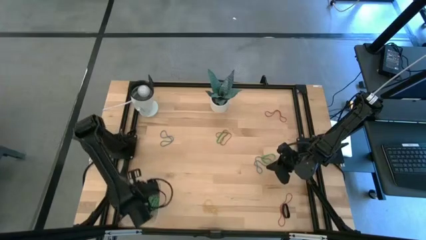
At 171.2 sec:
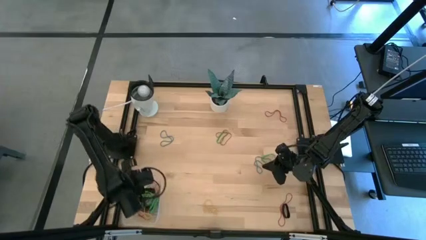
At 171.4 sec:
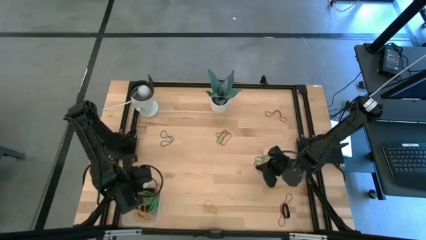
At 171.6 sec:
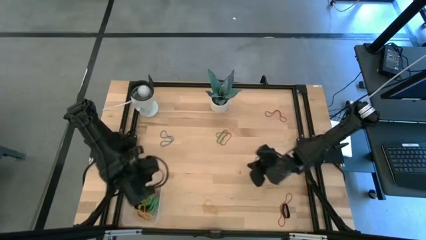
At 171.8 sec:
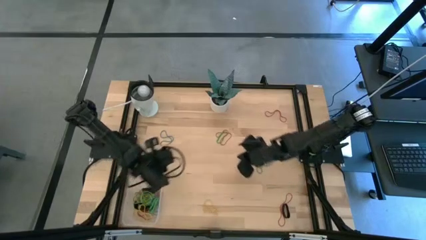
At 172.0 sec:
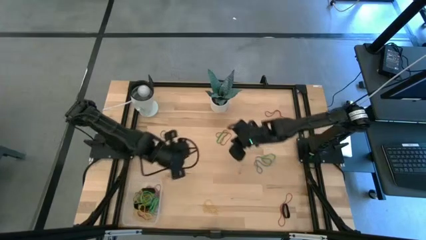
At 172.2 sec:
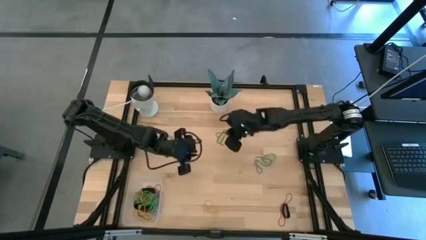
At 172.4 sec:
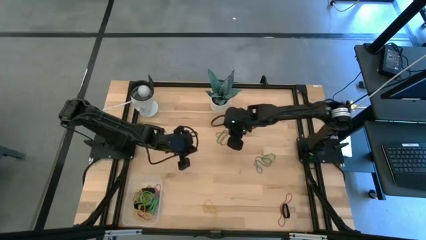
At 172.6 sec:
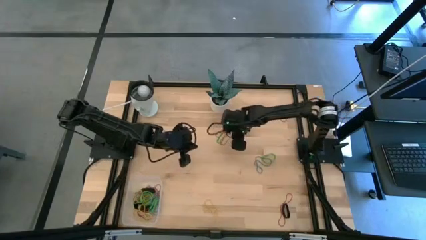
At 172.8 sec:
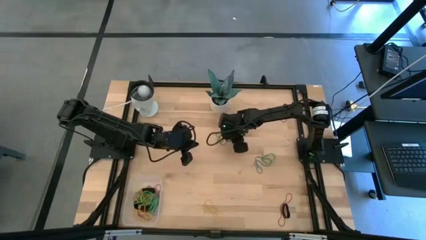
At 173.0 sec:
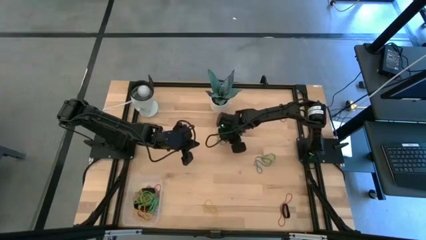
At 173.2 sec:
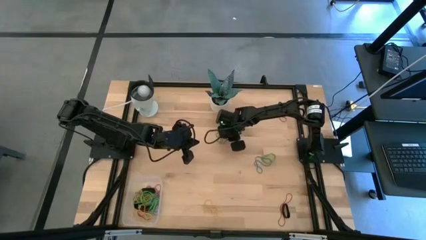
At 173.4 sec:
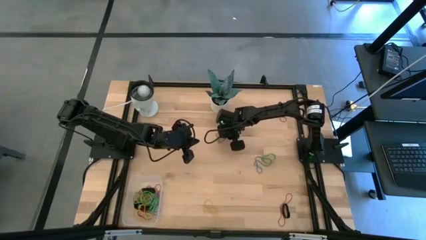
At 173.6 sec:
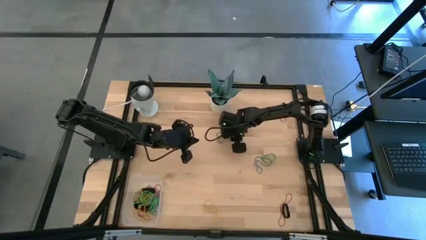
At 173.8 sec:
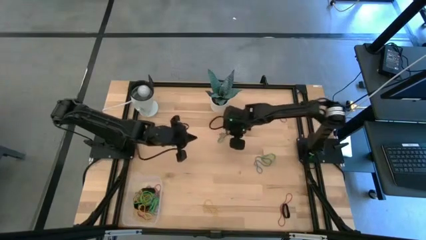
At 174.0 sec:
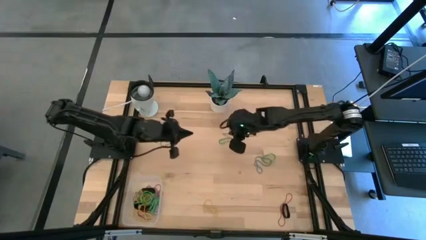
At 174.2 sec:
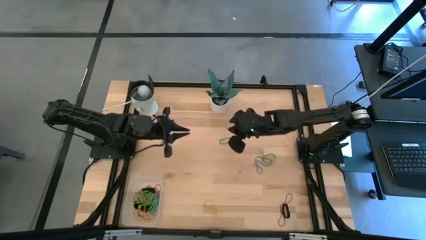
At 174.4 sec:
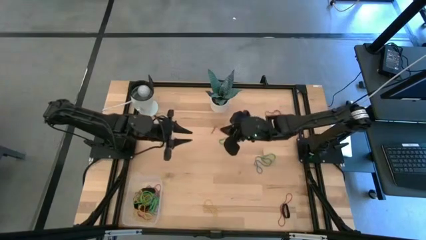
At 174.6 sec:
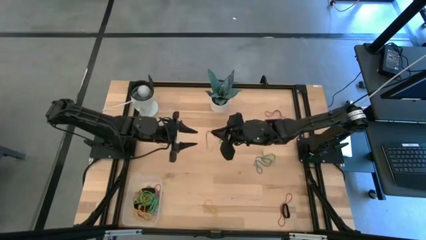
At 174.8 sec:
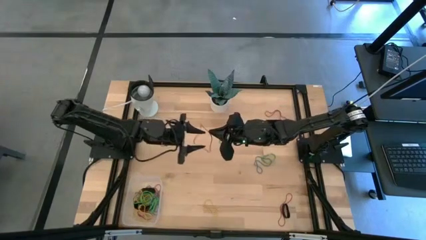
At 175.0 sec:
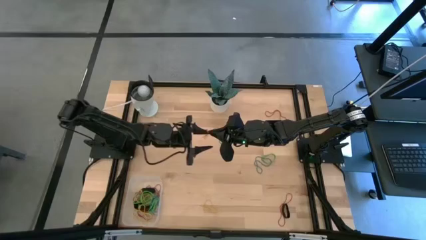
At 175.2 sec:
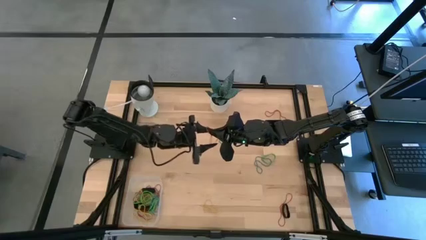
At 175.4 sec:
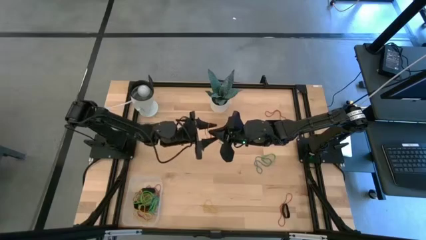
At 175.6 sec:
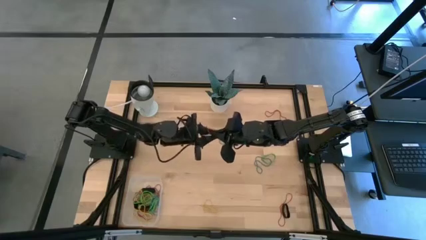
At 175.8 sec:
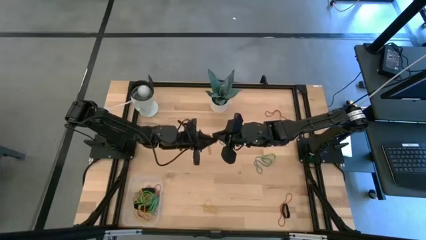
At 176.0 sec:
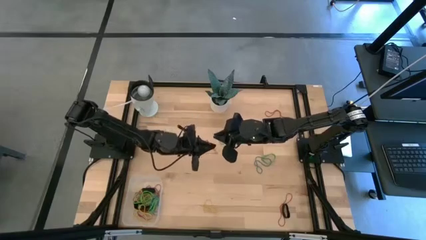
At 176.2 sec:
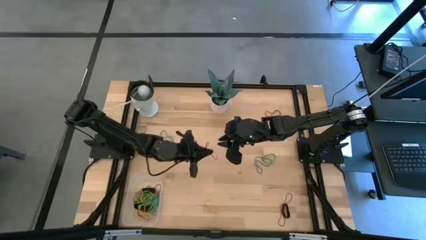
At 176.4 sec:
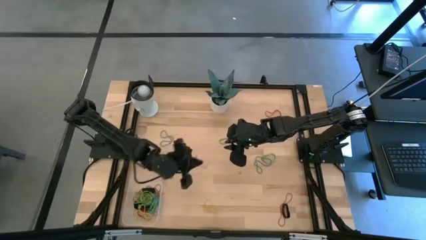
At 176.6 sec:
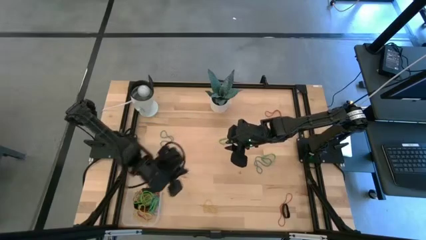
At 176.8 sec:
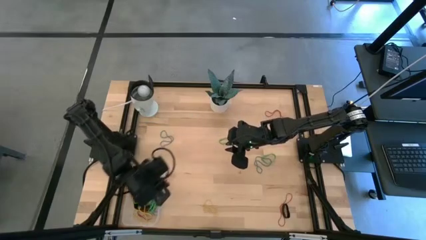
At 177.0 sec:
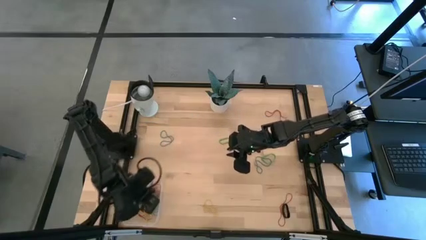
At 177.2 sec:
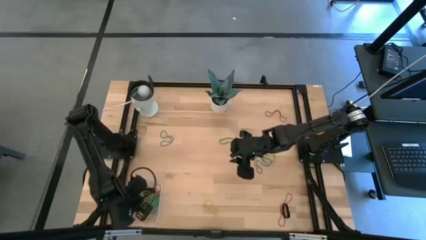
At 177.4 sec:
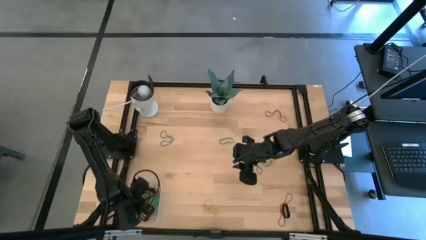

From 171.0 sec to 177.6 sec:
Task: Pick and place rubber bands into bin
Put the red rubber band into the transparent bin

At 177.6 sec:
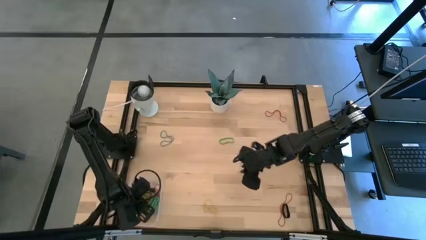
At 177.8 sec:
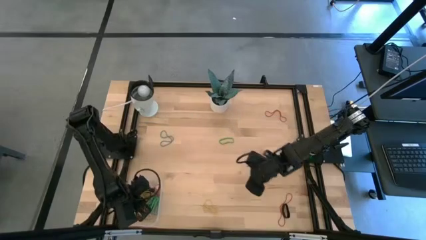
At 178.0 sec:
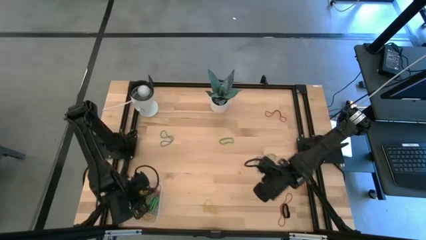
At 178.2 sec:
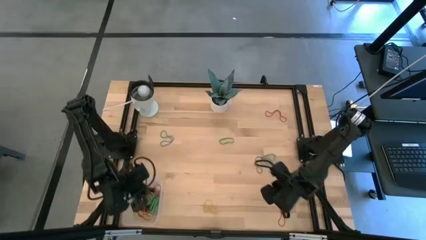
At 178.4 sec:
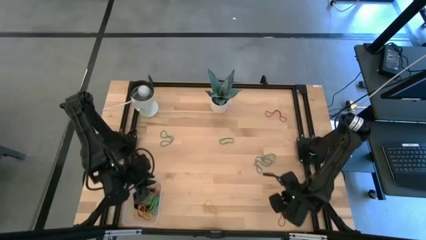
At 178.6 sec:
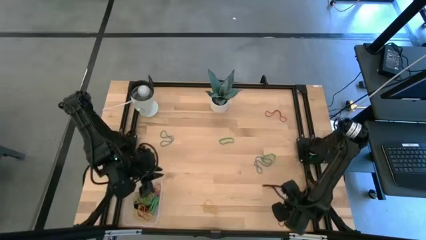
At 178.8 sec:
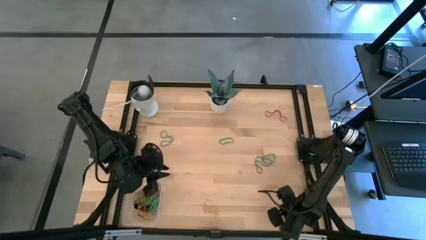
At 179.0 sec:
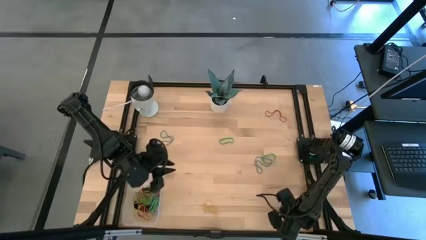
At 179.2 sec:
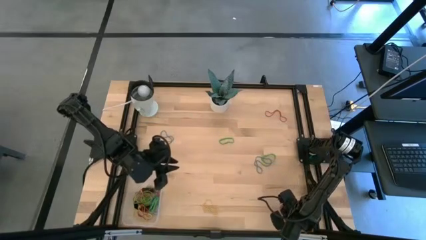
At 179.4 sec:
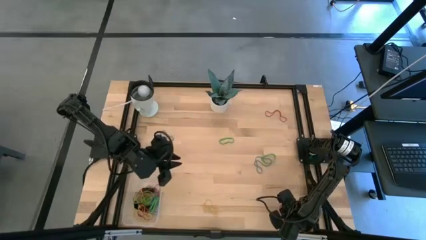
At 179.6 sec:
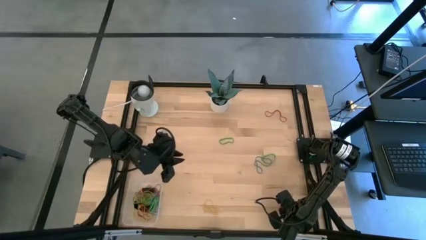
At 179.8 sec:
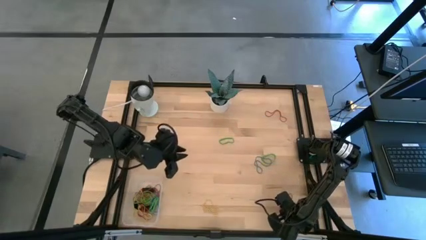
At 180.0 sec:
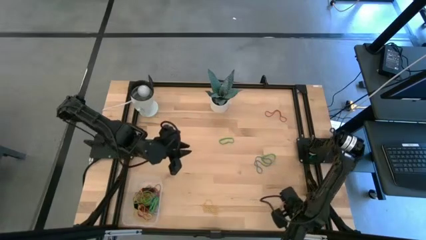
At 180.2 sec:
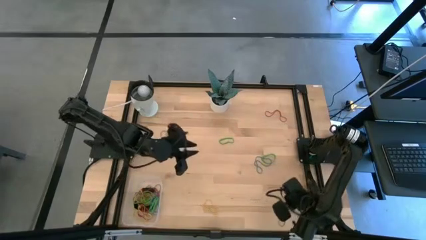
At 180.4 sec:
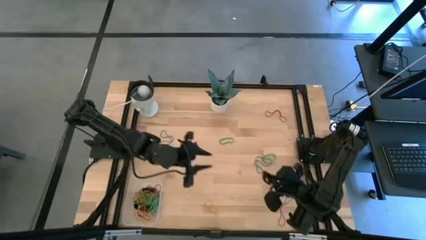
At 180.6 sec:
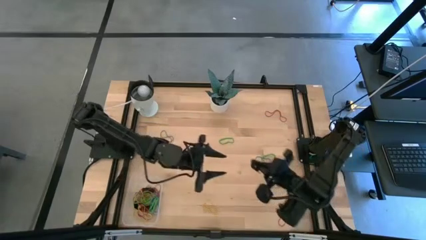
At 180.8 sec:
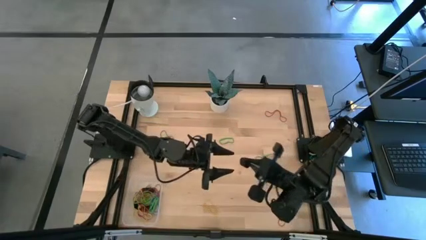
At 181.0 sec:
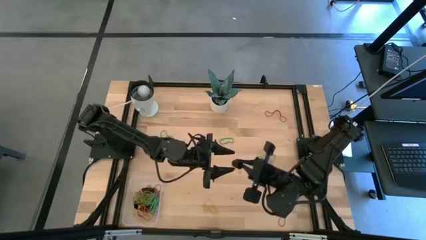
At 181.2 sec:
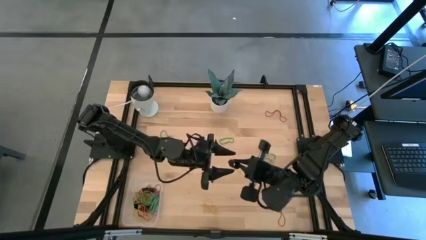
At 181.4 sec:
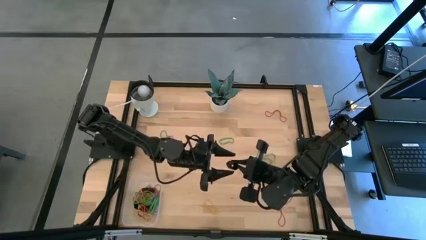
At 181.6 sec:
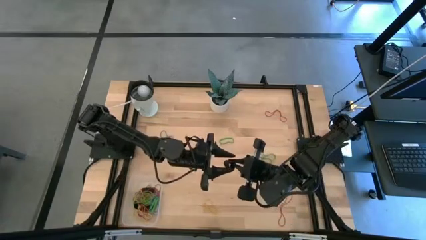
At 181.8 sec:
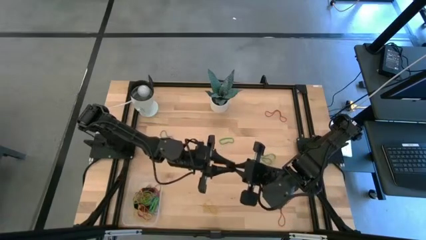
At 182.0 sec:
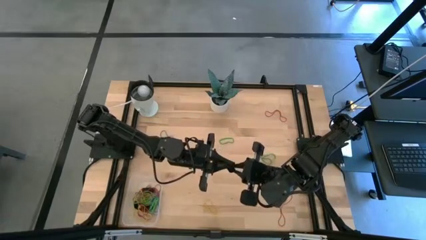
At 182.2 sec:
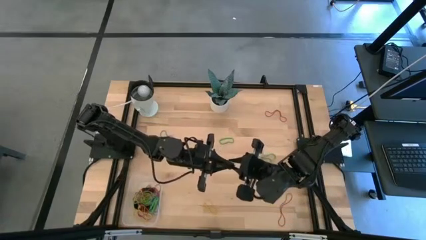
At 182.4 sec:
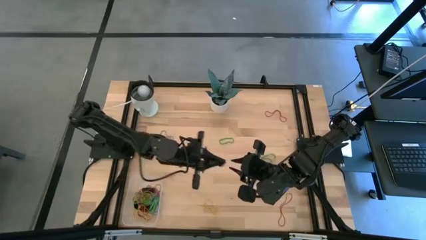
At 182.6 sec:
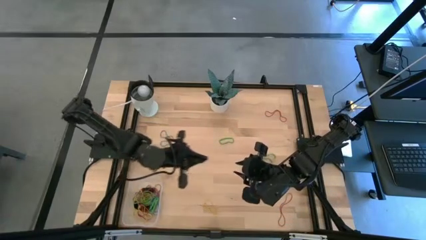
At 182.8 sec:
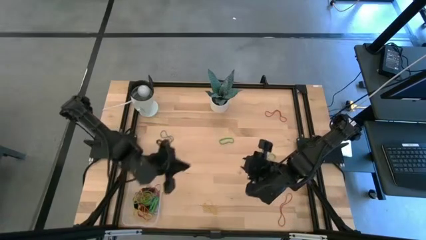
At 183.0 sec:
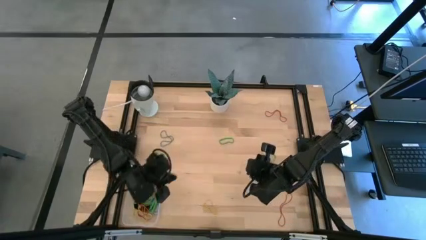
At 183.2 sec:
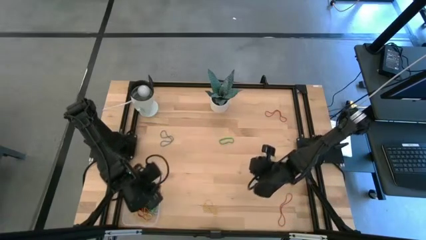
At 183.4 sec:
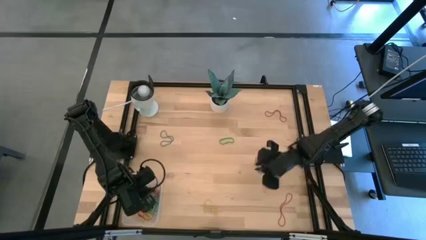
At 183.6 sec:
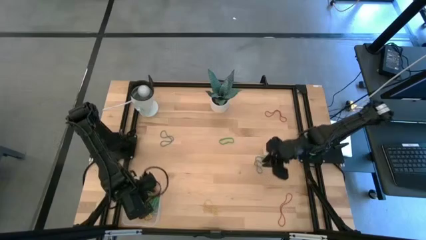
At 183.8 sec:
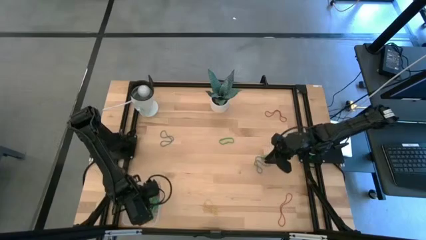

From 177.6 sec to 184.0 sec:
Put the black rubber band into the transparent bin

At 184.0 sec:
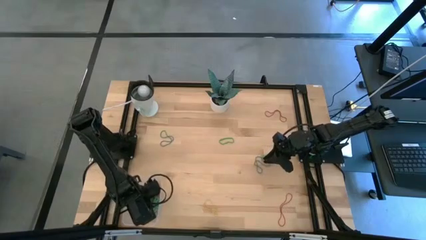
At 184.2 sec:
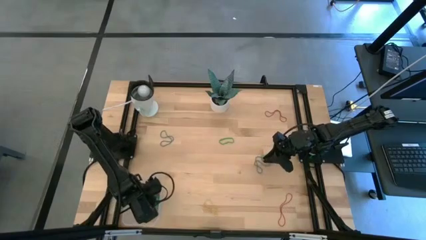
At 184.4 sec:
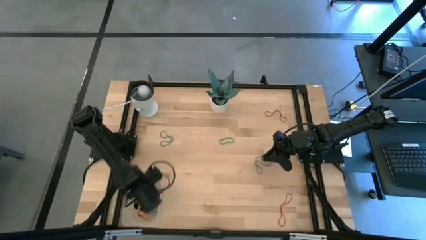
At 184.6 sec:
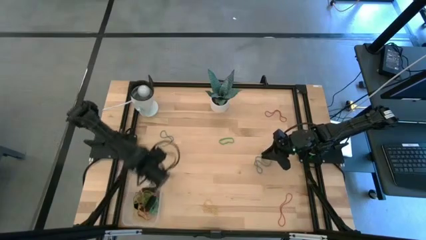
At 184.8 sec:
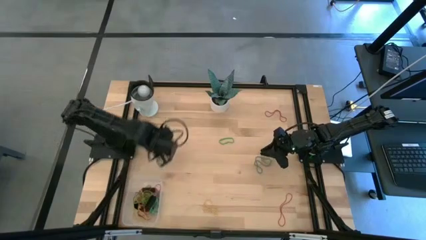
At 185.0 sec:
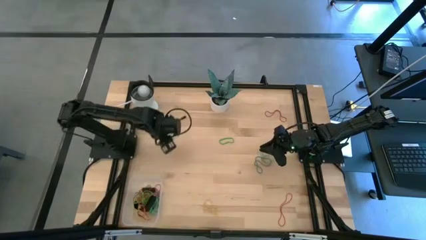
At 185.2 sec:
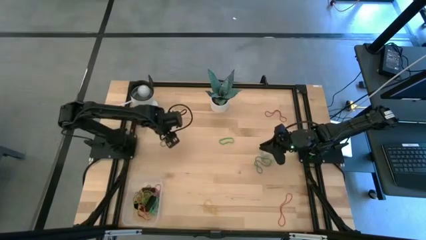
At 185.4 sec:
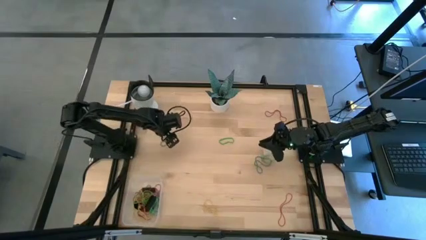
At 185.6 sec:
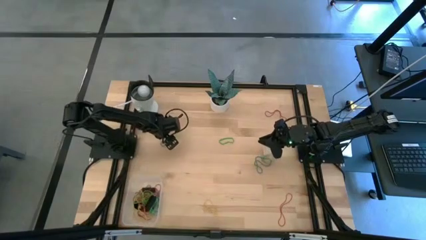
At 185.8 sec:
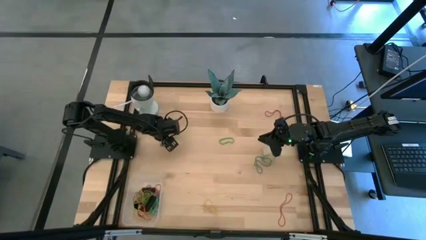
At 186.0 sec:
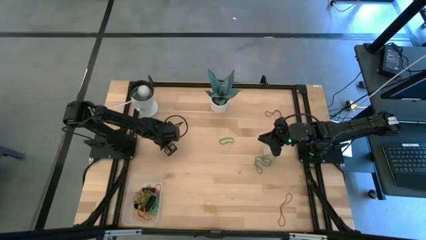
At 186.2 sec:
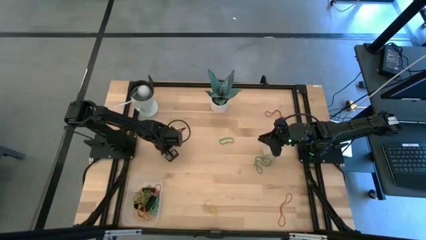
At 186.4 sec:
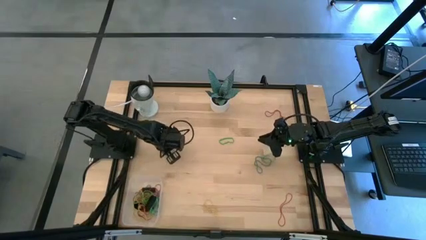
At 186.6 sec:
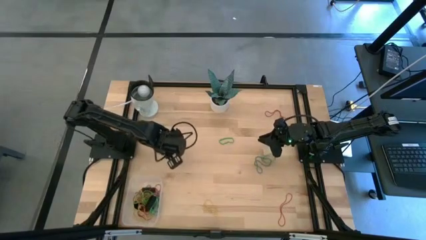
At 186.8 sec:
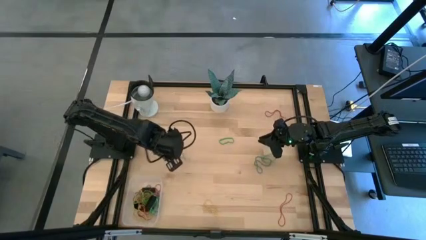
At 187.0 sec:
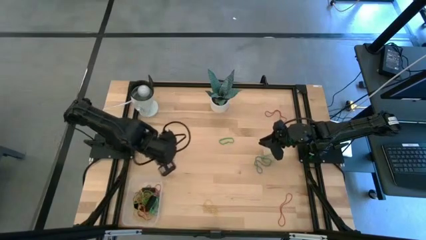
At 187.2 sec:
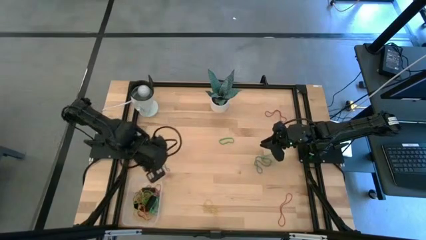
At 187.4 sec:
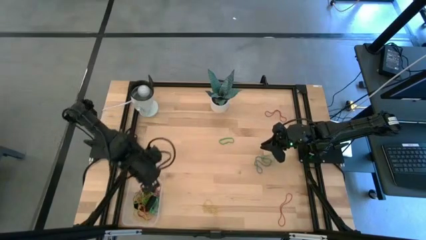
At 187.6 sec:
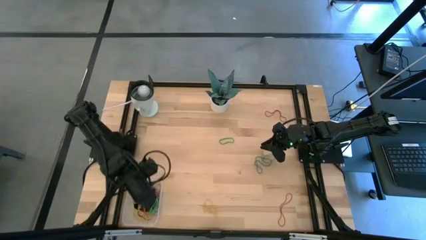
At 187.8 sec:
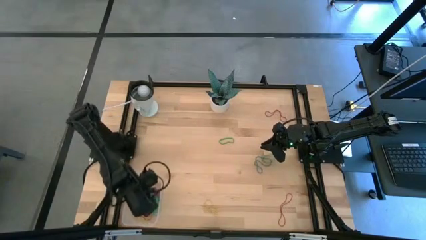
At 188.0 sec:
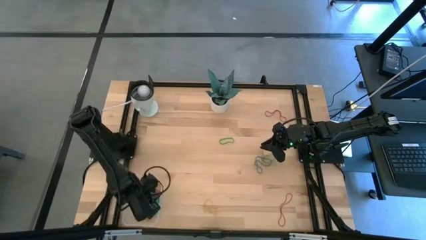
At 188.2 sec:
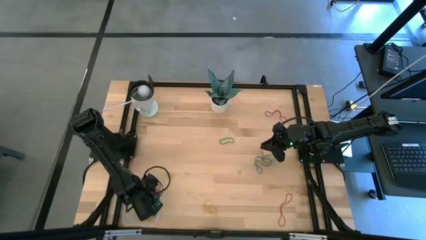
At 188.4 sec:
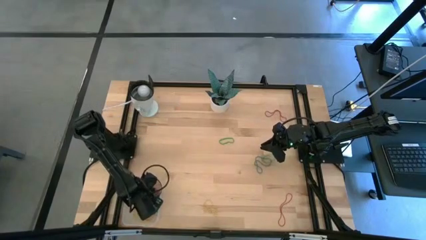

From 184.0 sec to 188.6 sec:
Put the blue rubber band into the transparent bin
